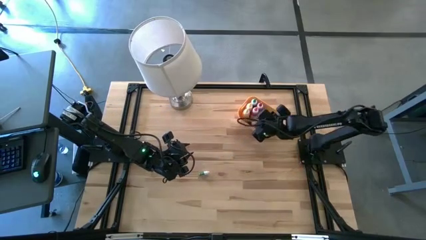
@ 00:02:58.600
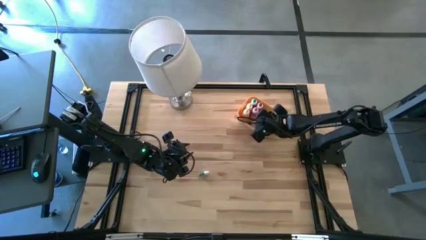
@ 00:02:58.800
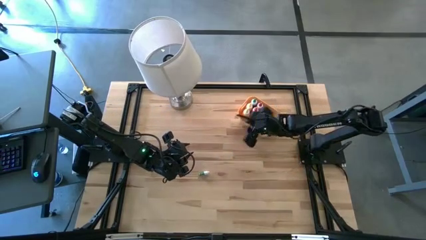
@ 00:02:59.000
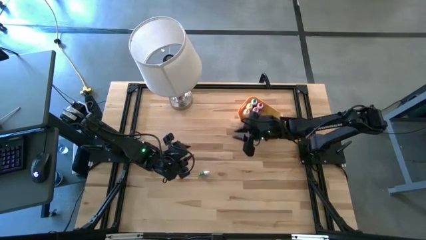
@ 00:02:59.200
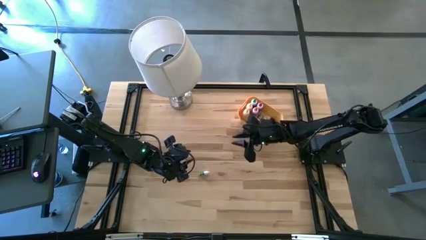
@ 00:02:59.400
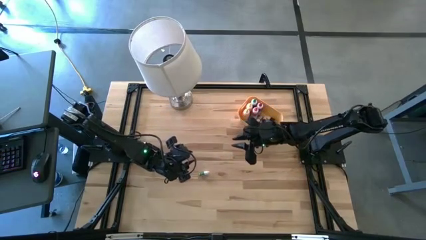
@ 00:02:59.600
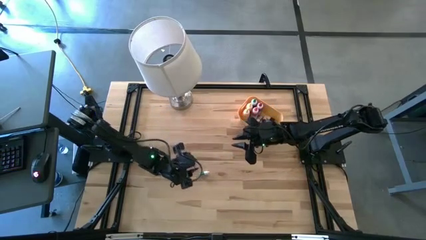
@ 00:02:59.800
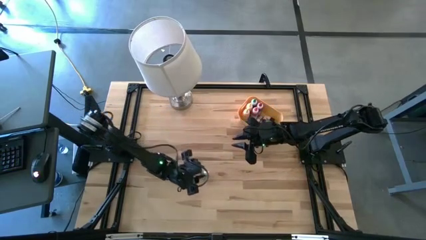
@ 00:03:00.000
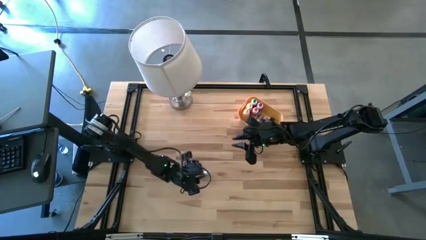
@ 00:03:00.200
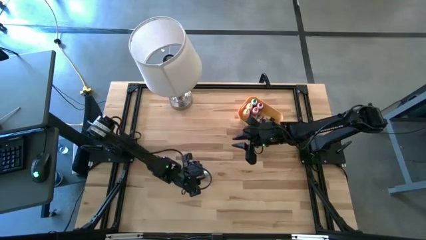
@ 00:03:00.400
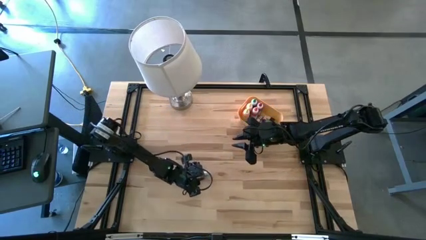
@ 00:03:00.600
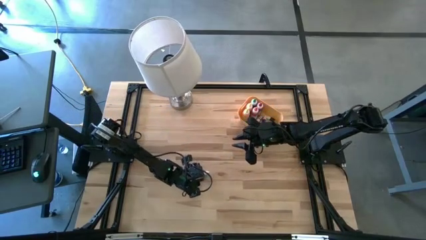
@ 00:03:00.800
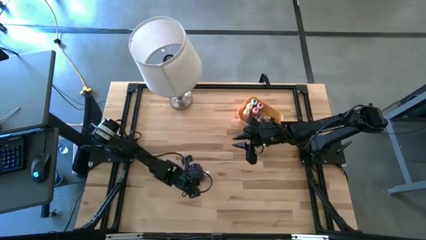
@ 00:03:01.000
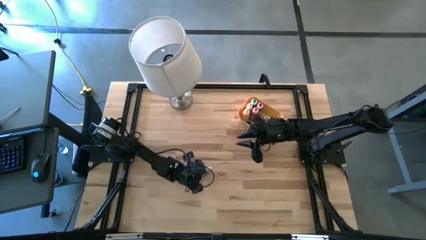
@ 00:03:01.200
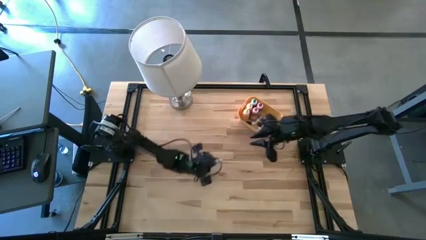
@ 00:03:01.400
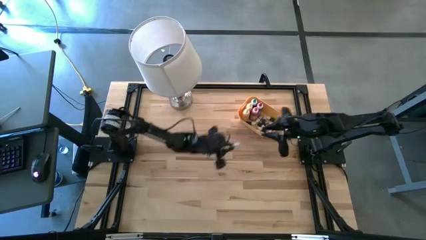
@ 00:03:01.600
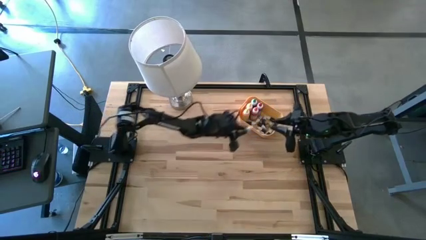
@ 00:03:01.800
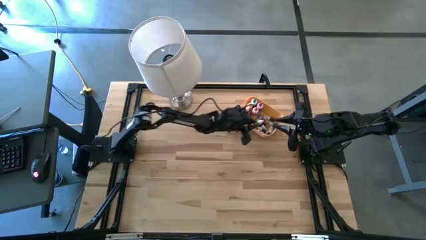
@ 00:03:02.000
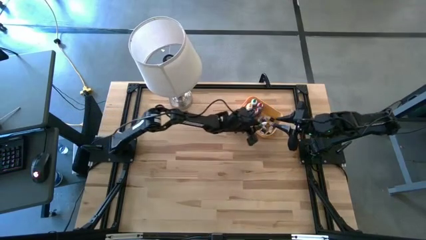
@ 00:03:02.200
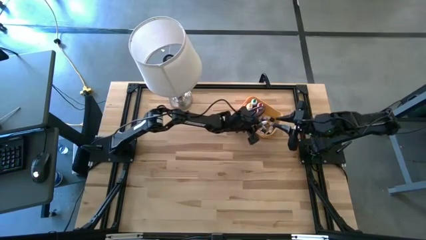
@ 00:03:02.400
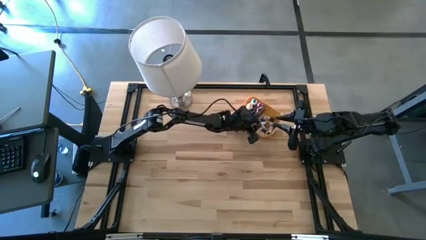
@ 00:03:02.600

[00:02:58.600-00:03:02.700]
Task: Pick & Place food coloring
Put the small green food coloring bottle into the yellow bin

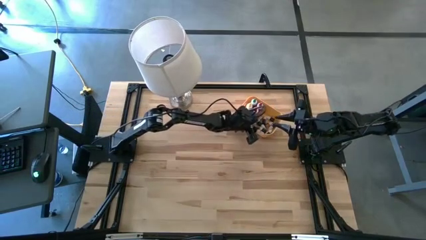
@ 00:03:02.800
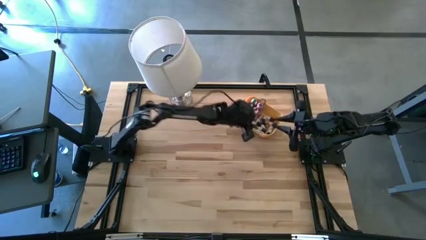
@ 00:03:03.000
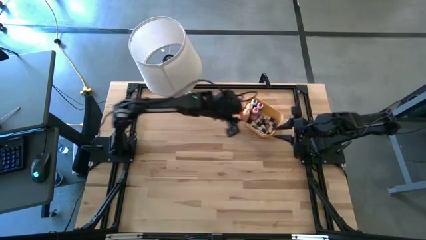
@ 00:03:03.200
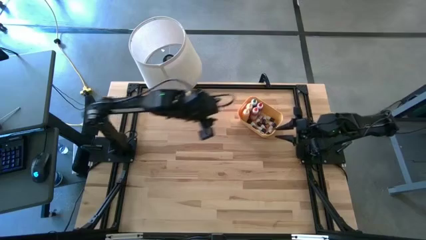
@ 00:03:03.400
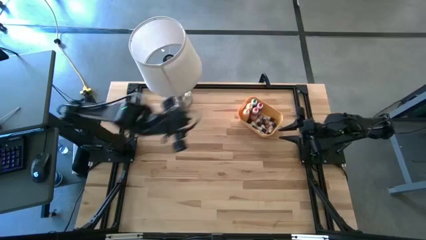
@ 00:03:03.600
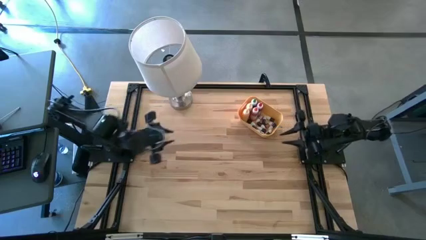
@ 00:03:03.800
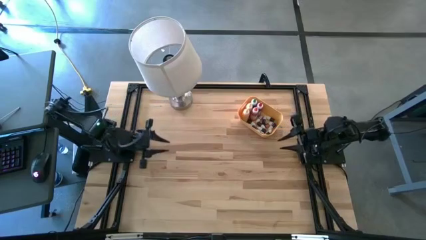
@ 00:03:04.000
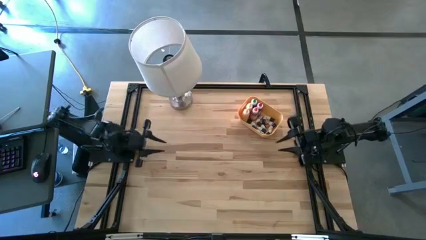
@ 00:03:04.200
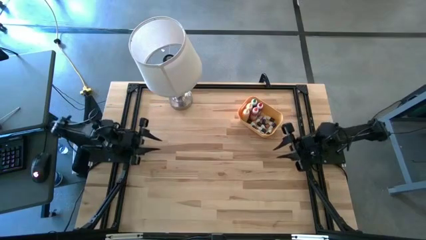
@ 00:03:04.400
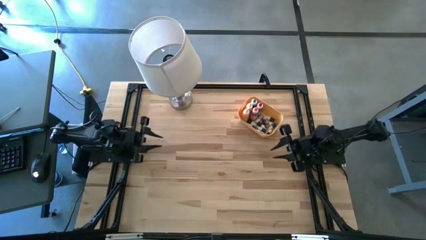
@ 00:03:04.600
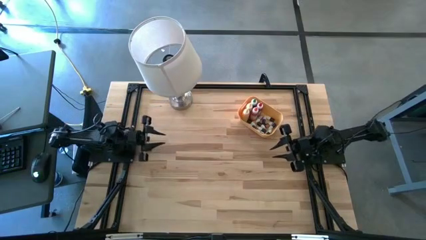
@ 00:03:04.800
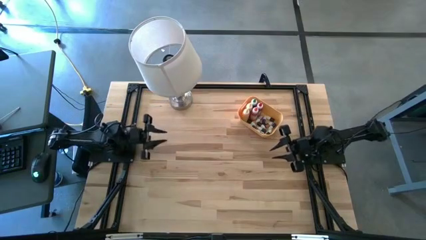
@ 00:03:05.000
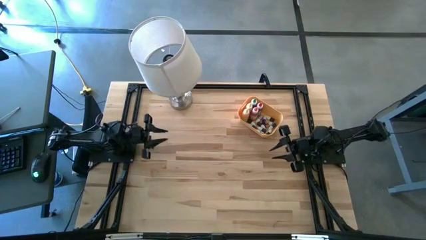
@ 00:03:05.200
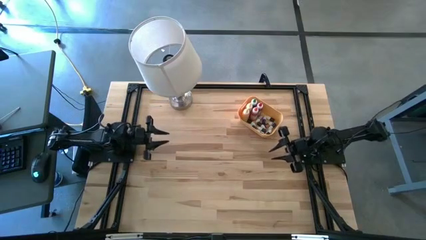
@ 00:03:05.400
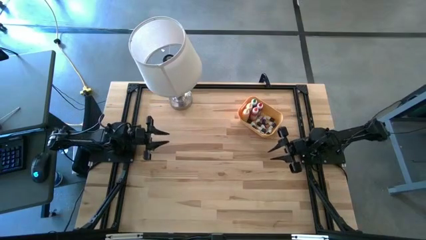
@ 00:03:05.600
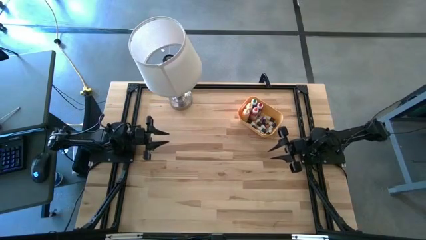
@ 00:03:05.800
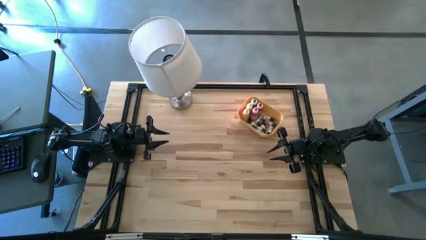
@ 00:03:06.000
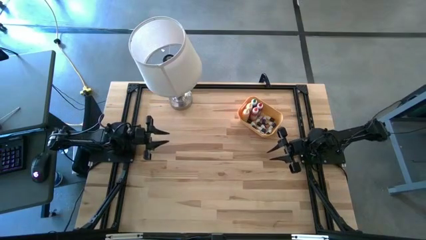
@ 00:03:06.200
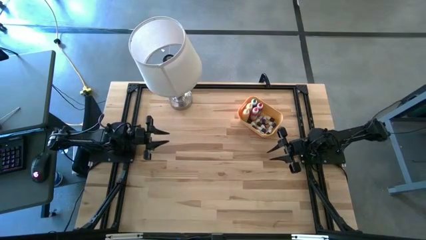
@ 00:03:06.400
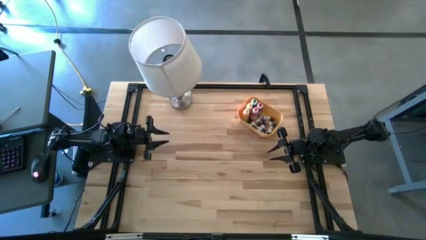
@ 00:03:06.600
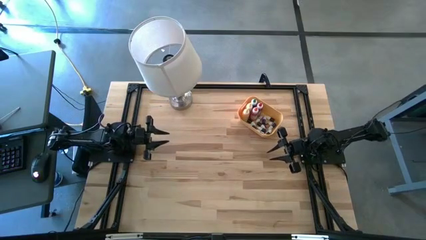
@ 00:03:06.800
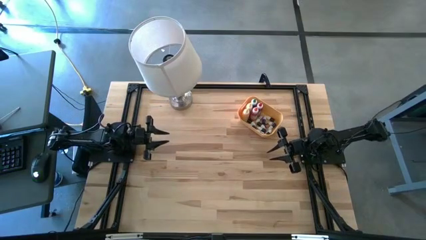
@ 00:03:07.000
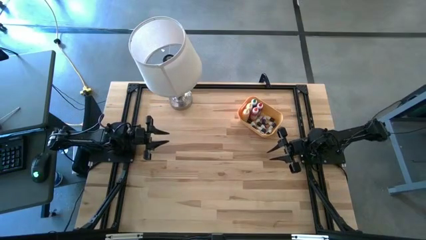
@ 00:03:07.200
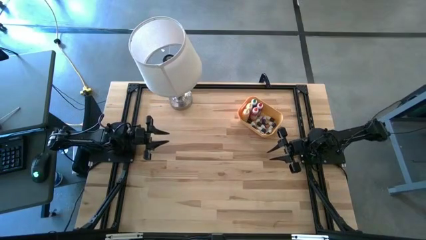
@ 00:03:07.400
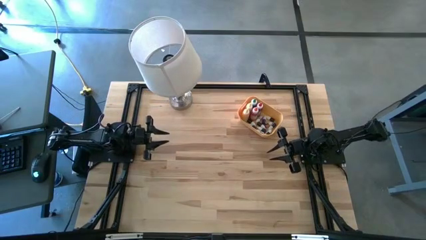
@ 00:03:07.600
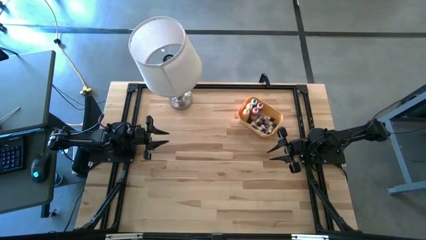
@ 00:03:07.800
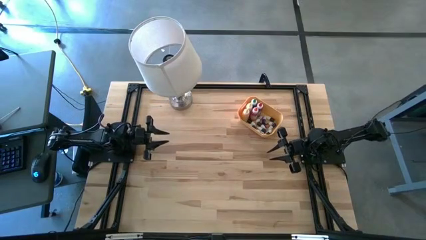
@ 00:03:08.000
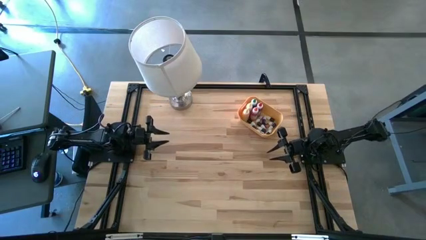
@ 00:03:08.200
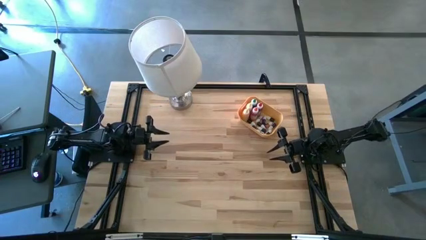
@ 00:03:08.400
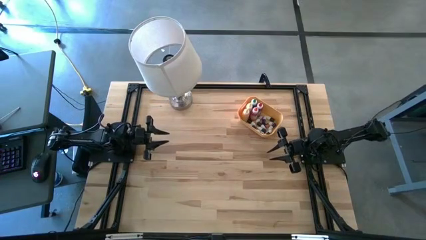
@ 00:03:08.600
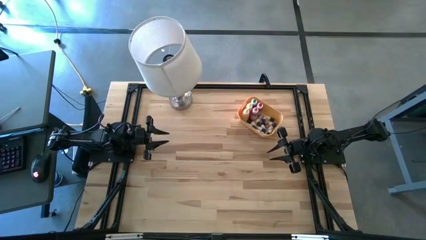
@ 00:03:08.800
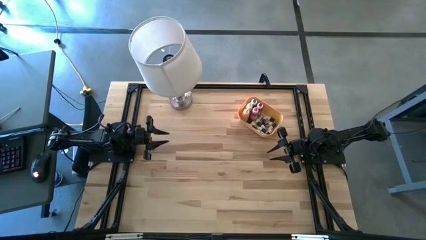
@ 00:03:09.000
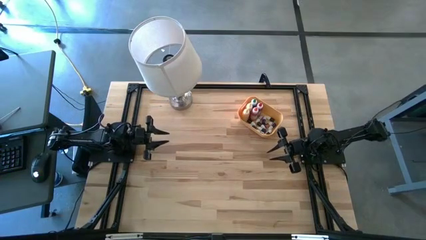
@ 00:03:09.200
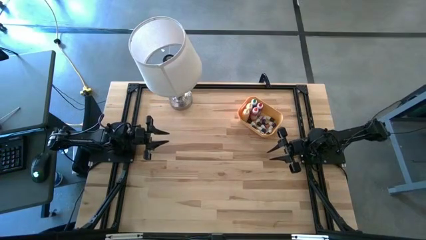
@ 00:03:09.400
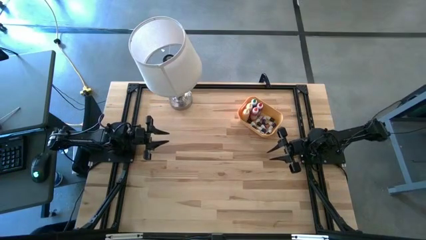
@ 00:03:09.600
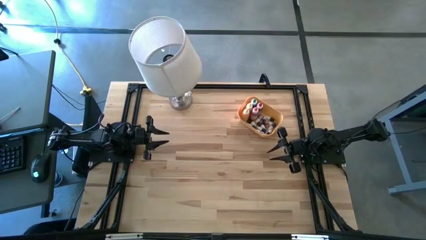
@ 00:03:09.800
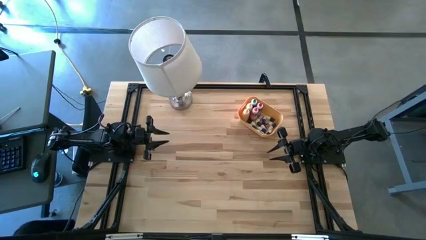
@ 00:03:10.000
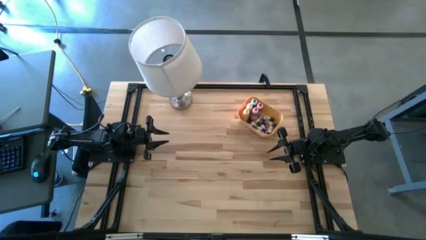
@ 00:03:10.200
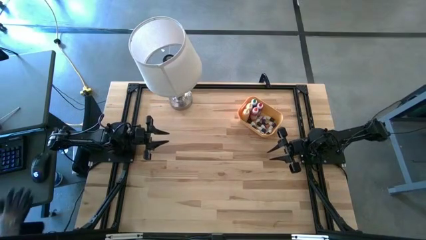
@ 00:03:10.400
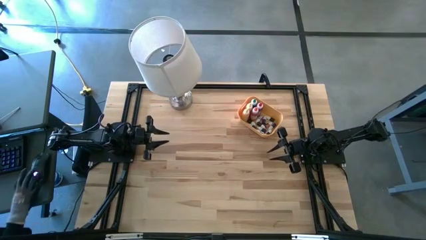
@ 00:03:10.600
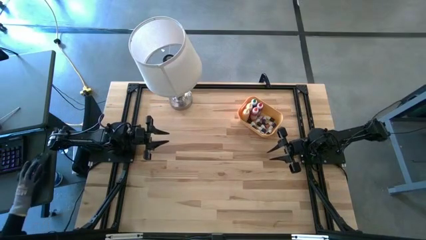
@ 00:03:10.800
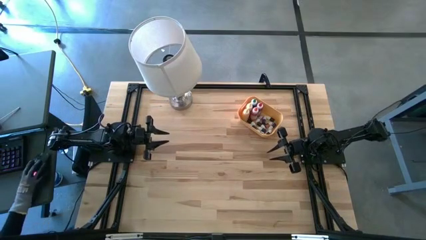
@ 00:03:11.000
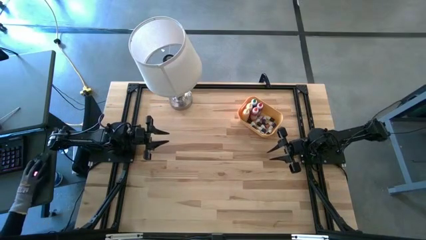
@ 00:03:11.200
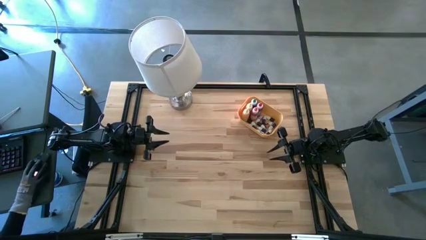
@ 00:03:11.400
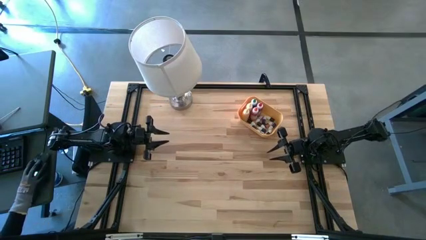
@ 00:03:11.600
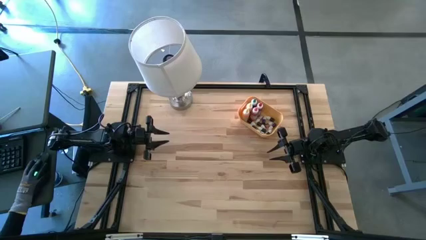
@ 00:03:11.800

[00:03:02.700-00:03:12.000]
Return to Home Position
